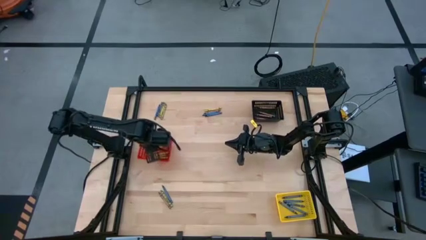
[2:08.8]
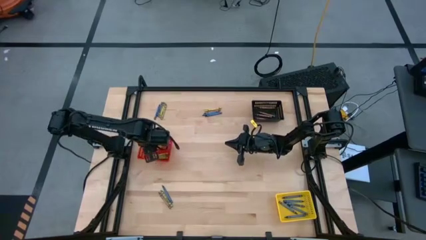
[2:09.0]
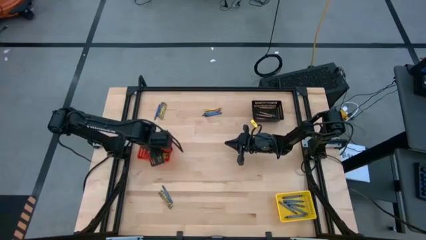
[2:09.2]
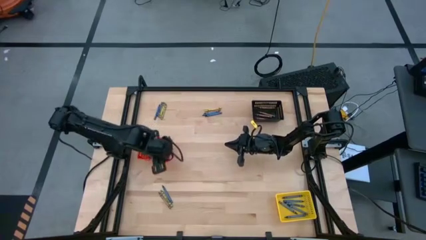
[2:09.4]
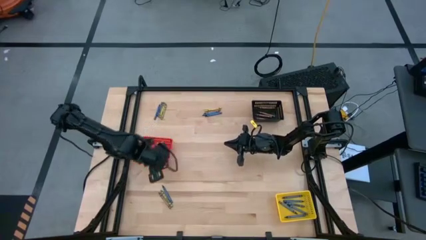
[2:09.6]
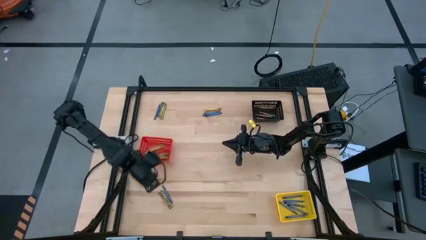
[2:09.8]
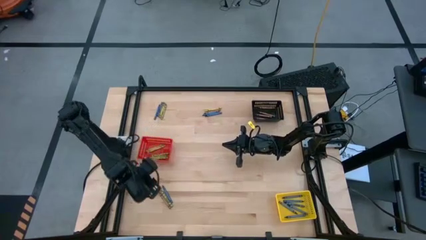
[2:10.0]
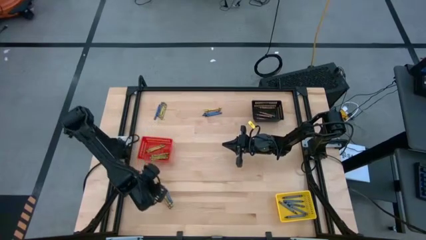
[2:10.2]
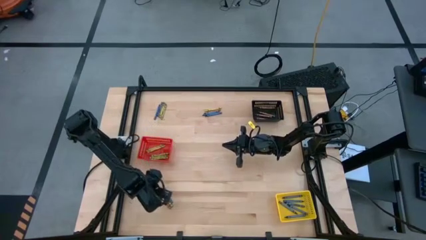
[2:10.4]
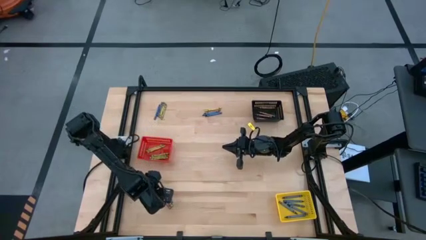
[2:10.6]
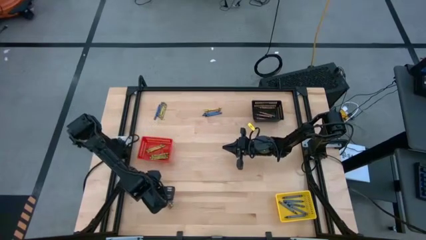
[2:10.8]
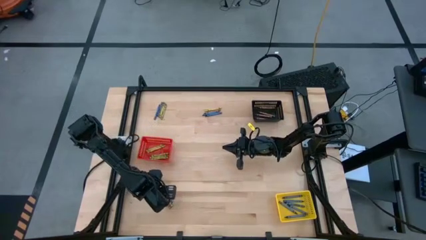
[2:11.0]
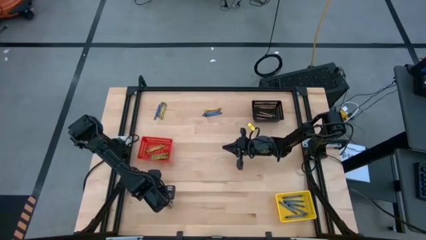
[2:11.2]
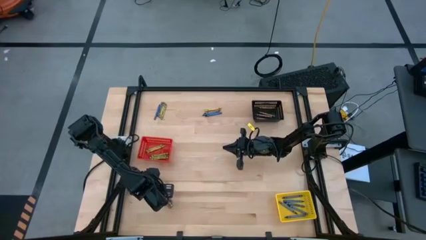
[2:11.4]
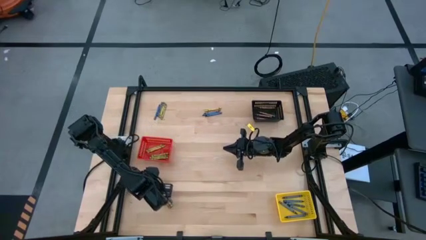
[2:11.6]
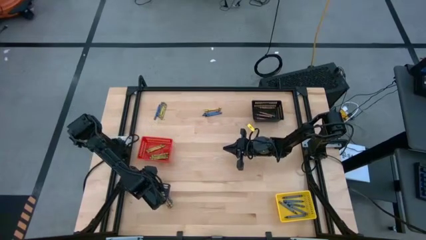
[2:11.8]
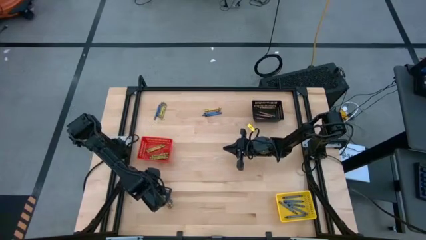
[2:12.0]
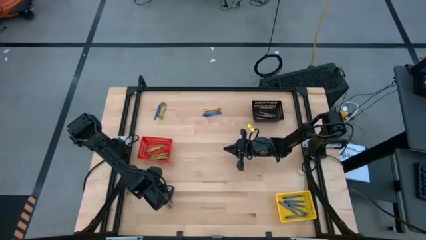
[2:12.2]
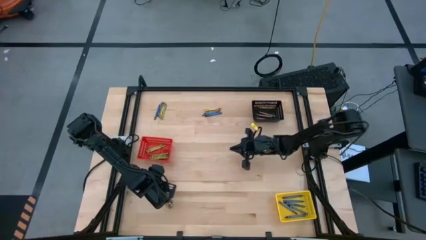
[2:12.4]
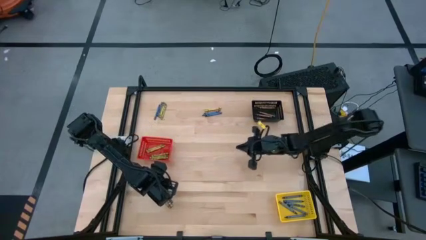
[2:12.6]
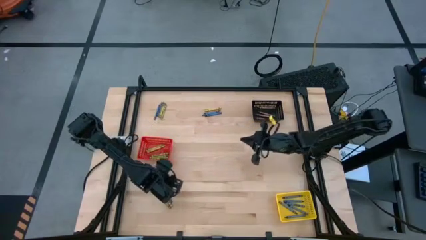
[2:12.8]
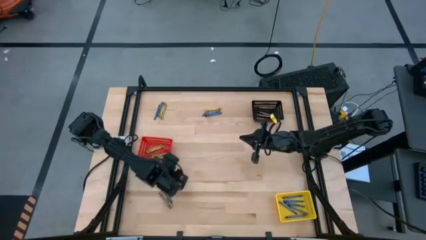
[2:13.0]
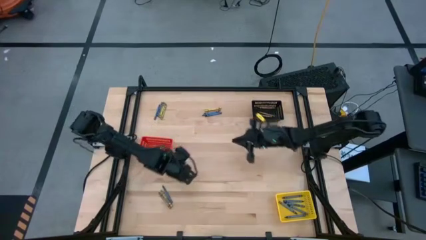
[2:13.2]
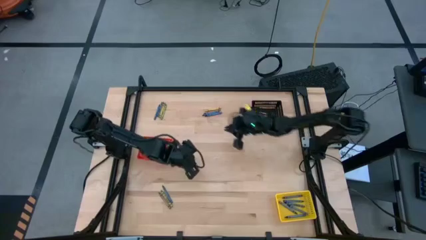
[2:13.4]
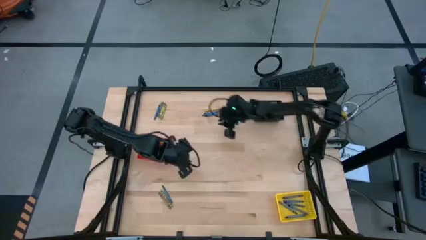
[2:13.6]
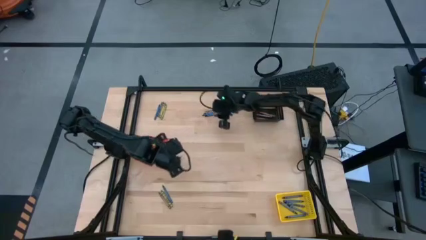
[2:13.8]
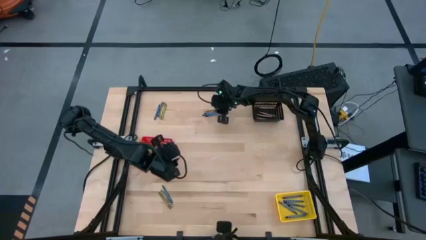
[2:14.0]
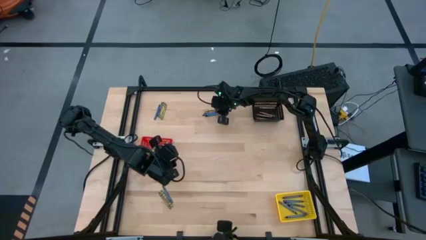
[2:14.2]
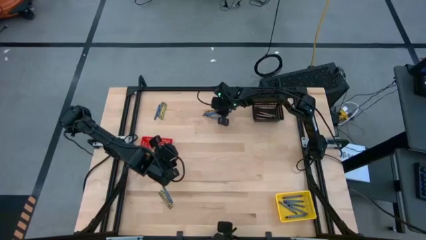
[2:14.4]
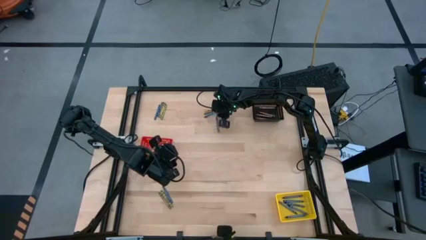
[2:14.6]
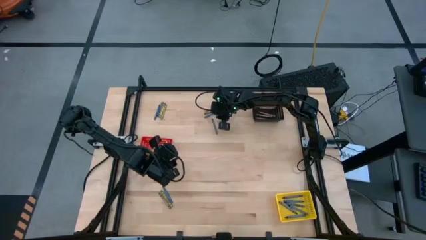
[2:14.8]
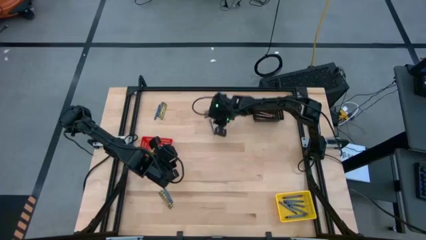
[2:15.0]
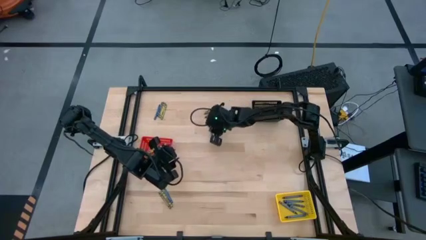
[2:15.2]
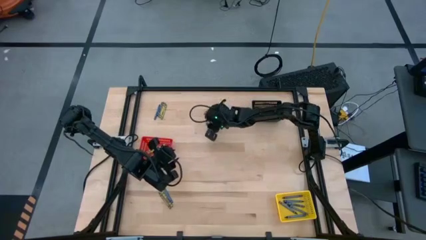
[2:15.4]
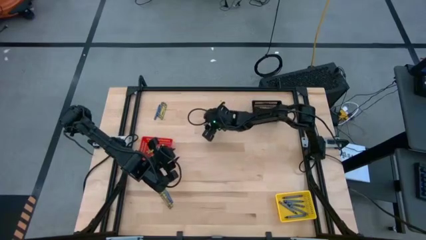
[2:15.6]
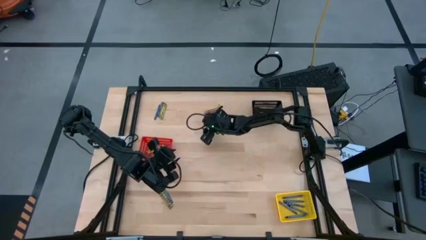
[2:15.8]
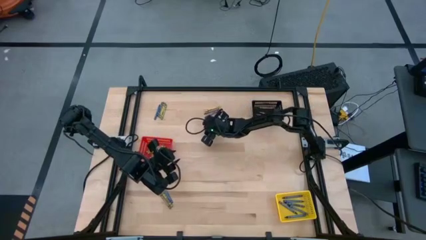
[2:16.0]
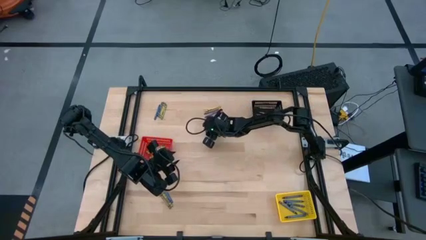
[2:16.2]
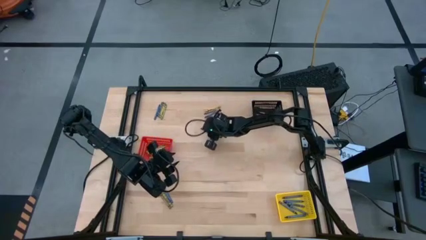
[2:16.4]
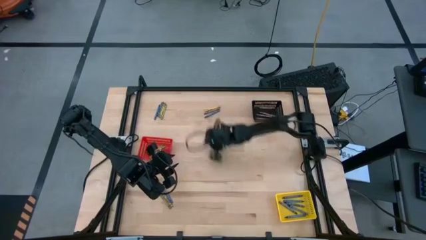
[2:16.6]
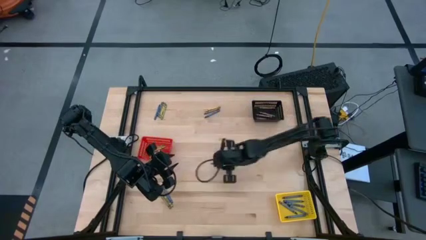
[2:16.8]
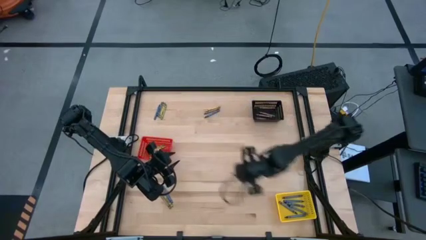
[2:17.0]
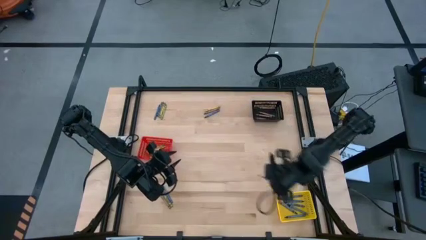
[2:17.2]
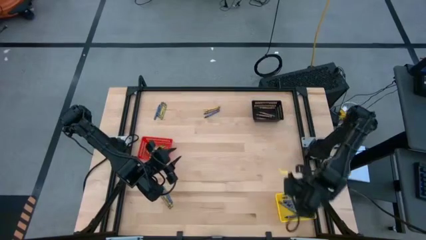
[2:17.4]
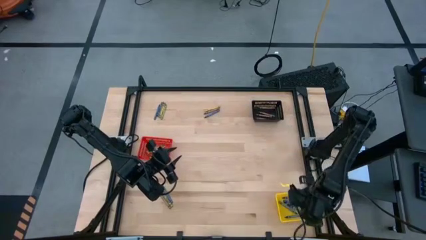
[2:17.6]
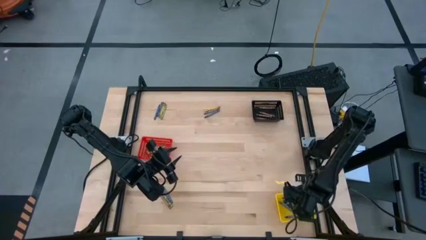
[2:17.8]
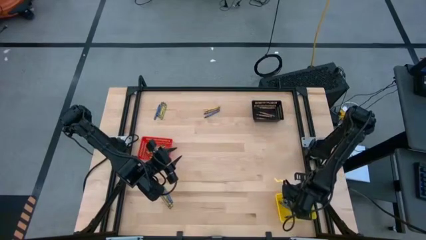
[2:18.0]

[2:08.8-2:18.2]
Task: Sort crayons
Put the blue crayon into the yellow bin

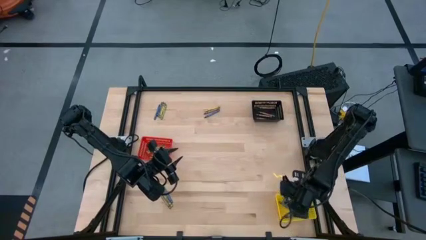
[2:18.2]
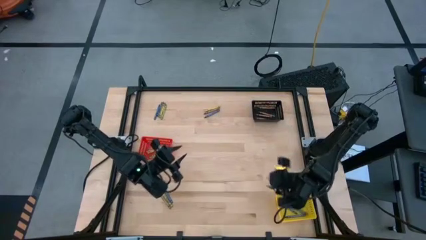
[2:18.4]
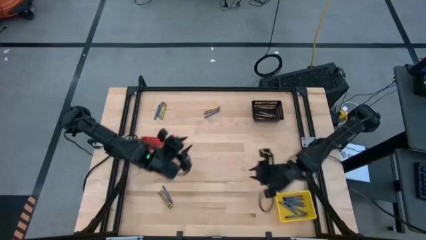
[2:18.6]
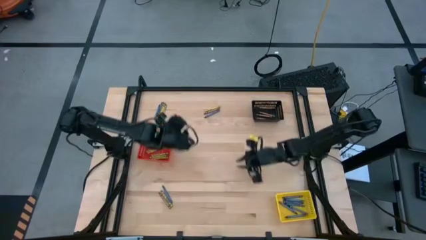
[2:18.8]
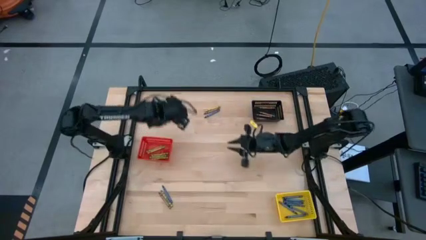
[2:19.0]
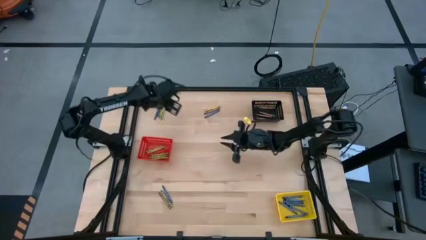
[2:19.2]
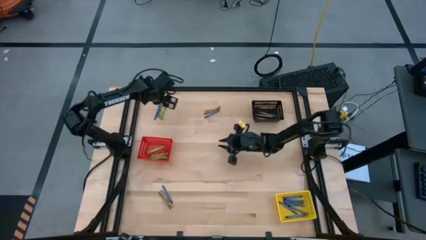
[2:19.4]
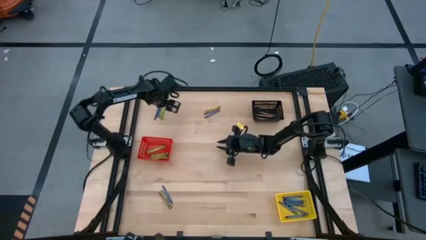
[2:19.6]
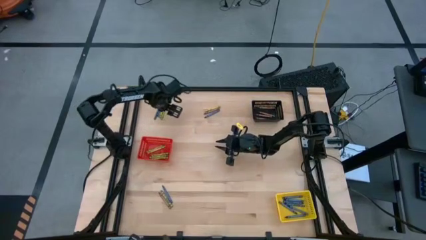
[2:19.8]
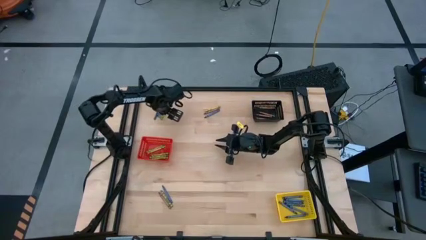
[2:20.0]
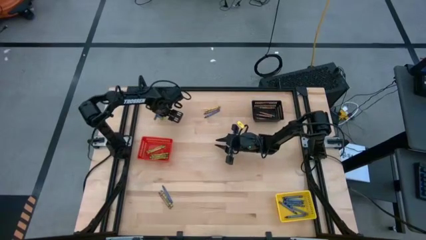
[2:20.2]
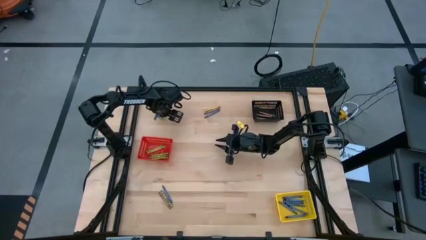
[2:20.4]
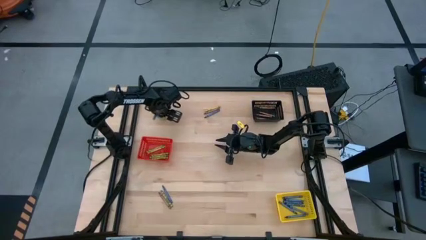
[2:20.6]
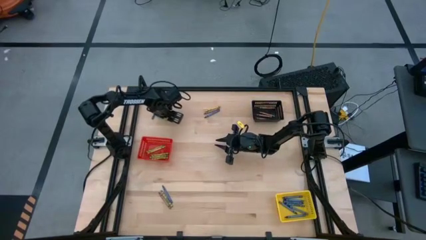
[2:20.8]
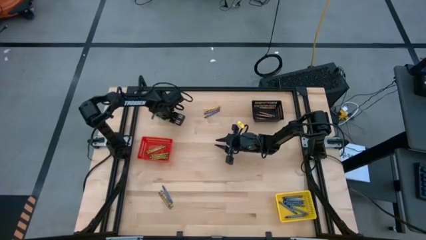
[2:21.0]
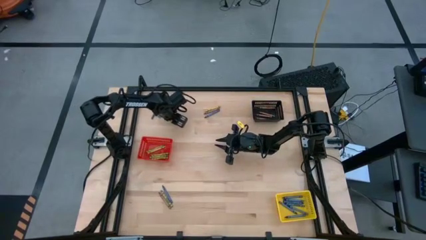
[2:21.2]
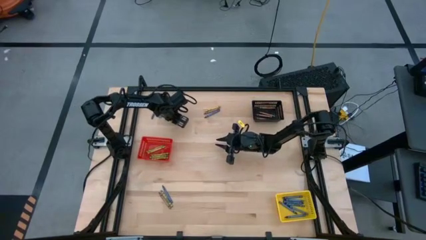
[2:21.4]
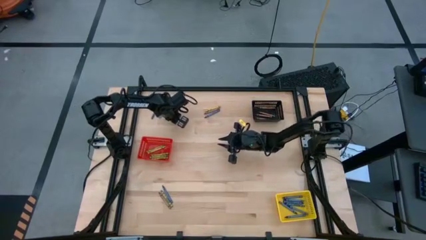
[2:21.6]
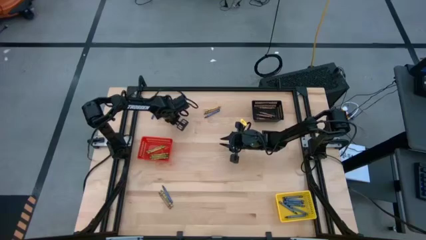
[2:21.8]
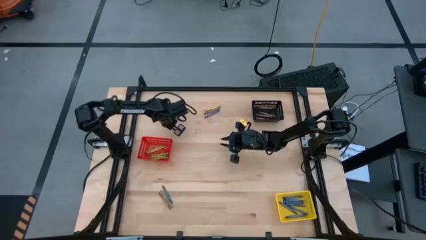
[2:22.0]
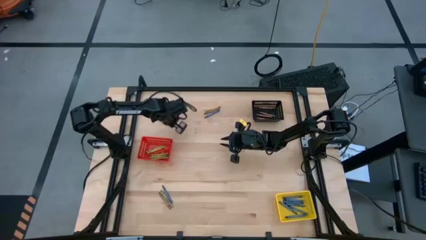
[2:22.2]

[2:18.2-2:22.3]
Put the right green crayon into the red bin

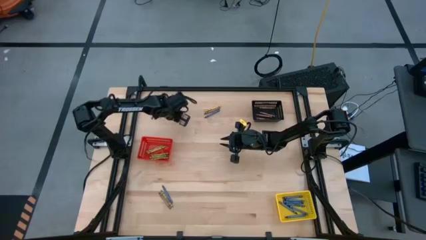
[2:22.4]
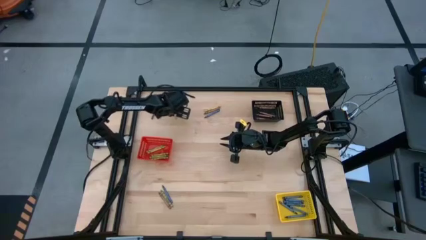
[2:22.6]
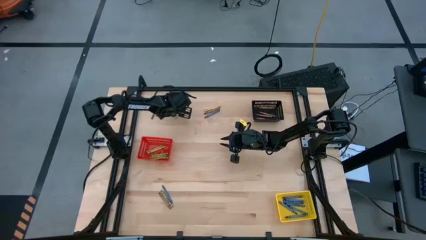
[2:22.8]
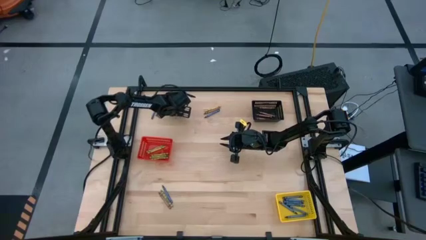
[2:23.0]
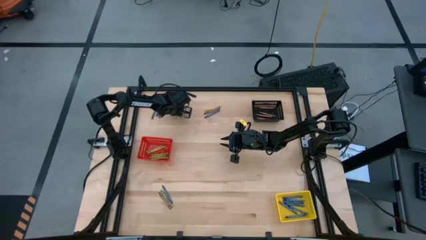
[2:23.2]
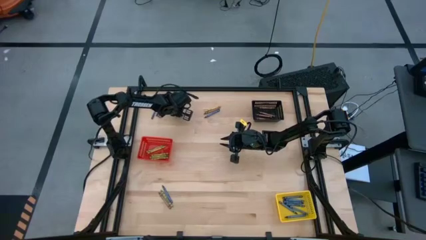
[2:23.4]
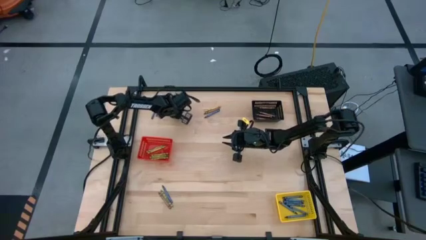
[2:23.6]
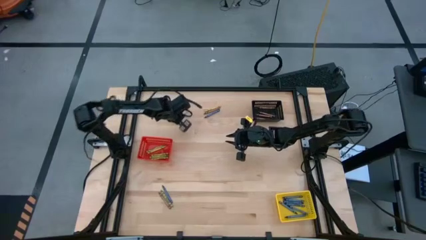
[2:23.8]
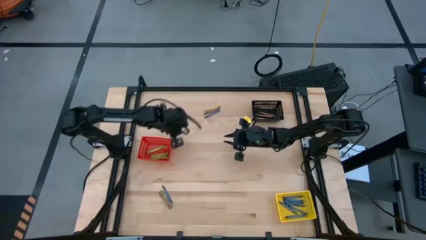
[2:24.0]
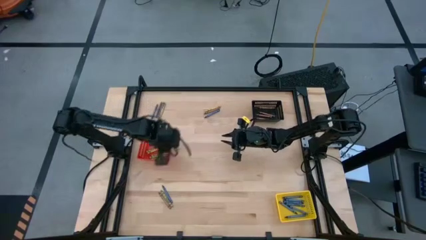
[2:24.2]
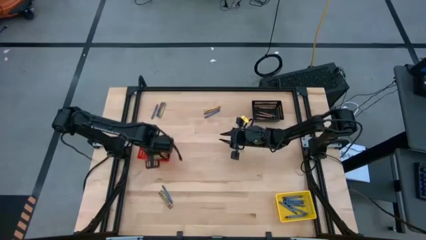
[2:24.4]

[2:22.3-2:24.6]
Put the right green crayon into the red bin
